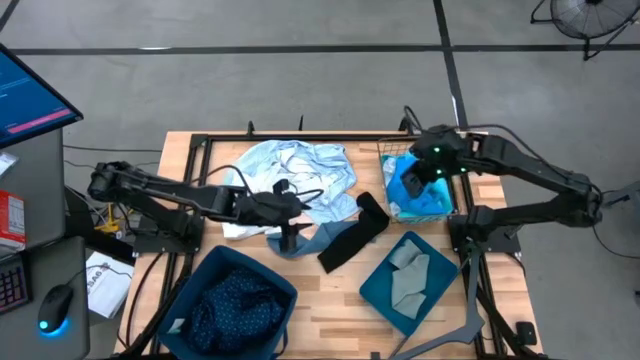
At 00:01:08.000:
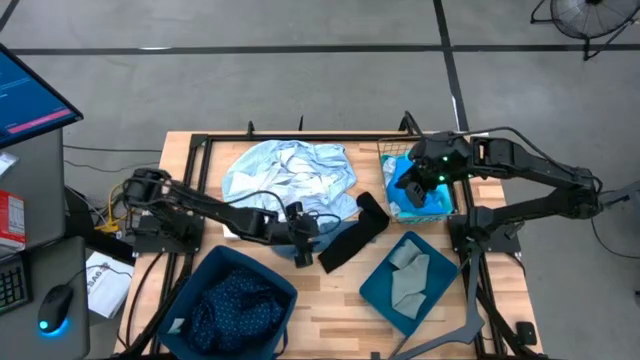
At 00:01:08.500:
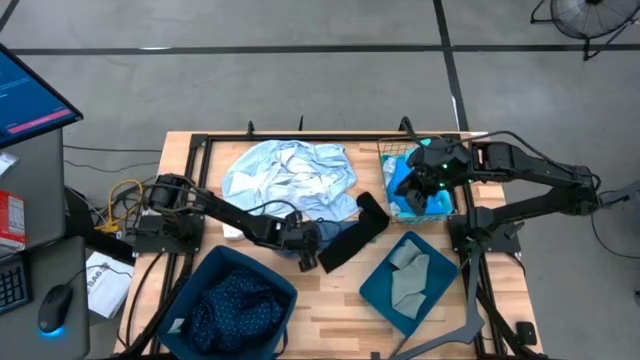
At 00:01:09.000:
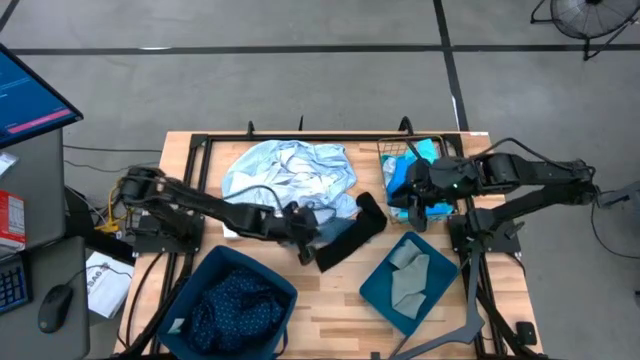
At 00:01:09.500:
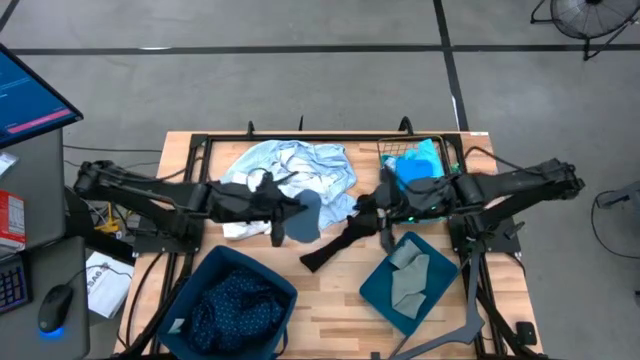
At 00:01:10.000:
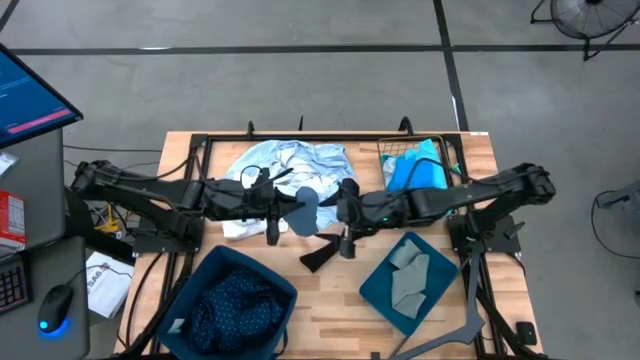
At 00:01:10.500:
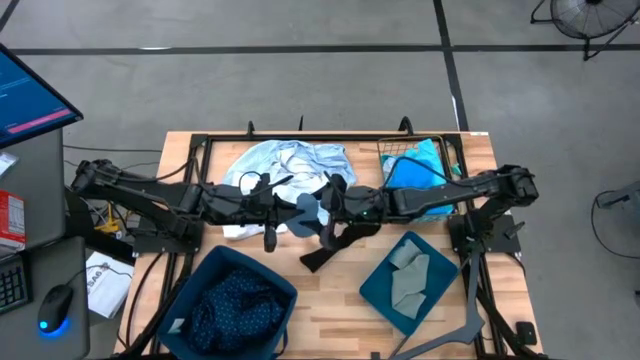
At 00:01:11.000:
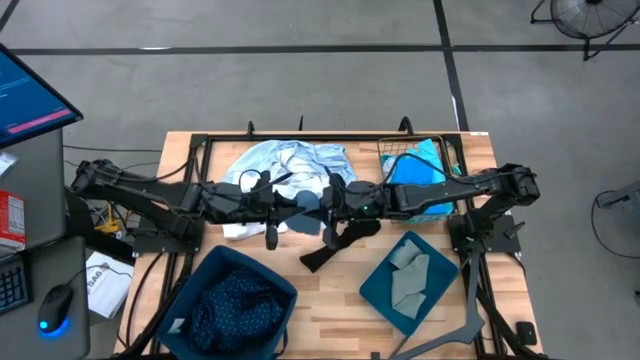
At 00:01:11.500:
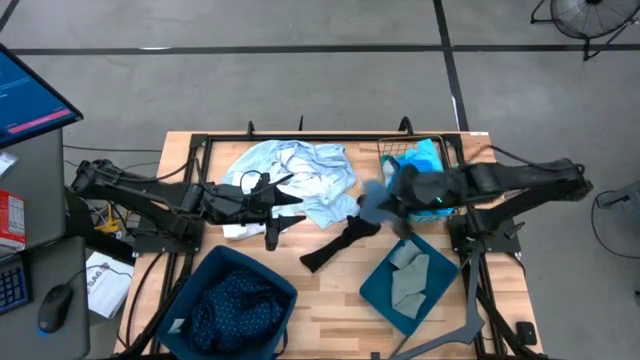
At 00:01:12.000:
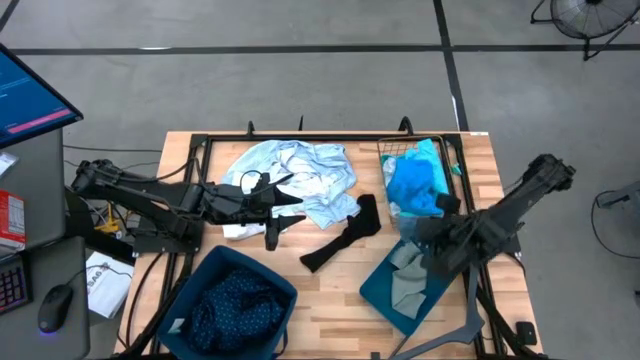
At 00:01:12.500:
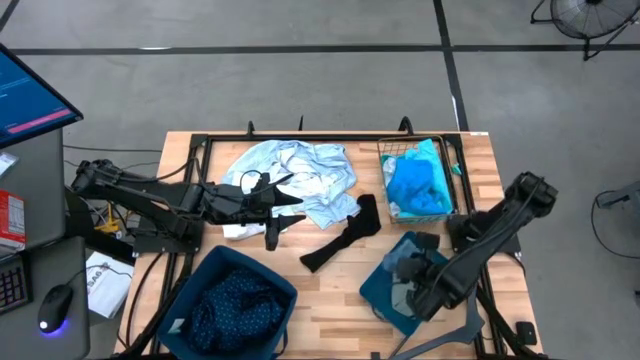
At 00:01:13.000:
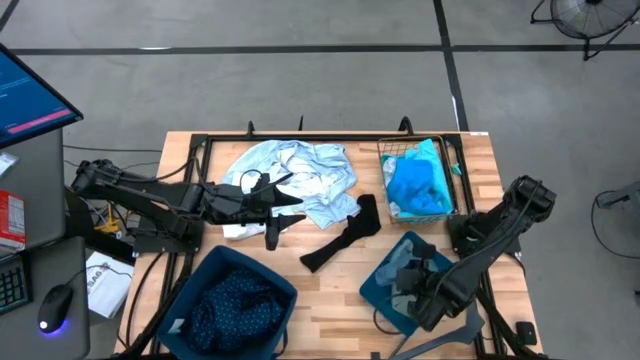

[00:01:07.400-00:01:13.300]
Task: Pick & Place Cloths
Put the gray sock into the blue bin

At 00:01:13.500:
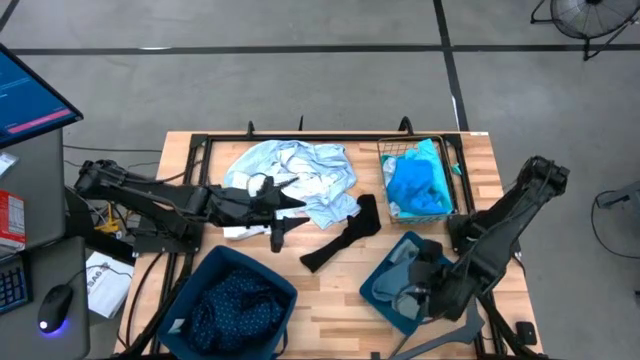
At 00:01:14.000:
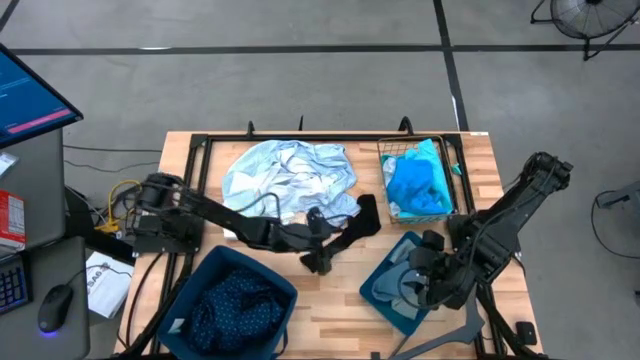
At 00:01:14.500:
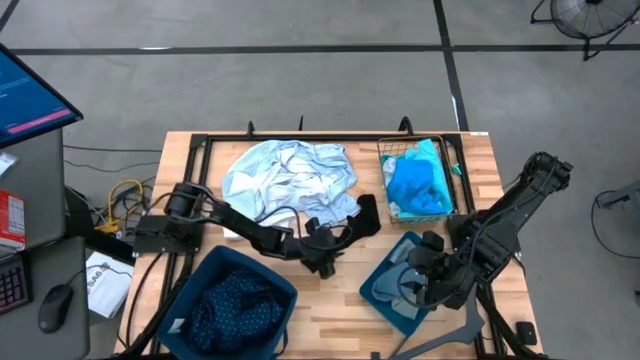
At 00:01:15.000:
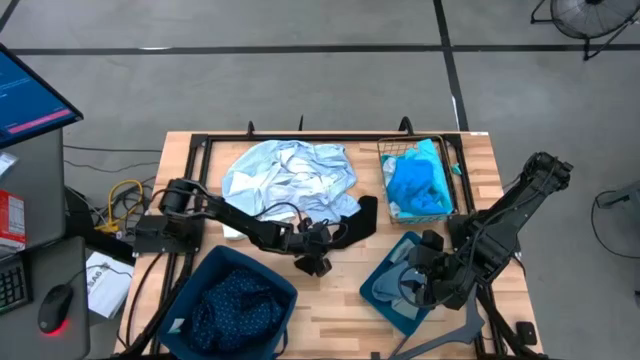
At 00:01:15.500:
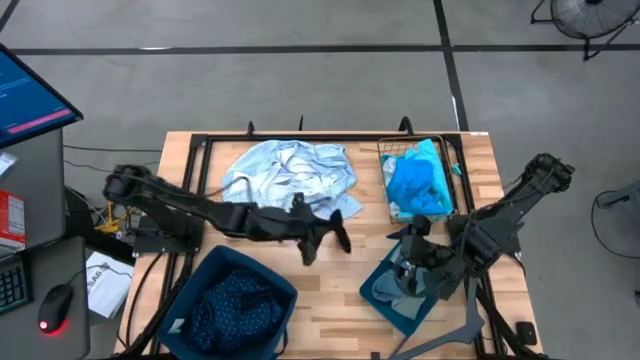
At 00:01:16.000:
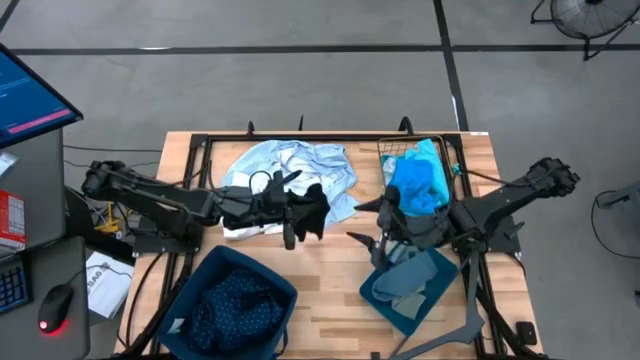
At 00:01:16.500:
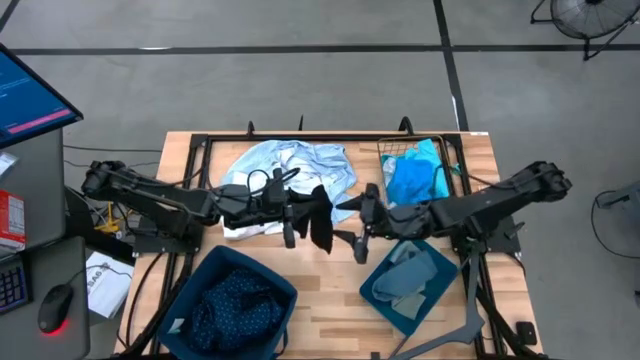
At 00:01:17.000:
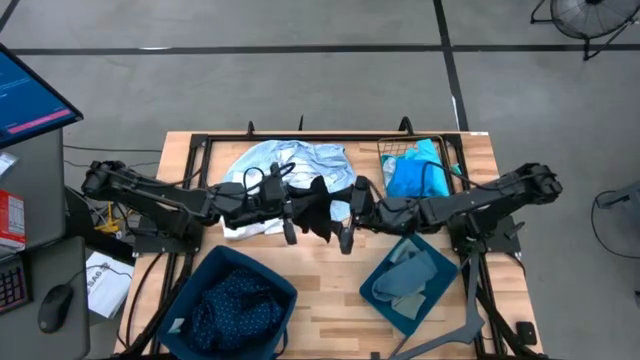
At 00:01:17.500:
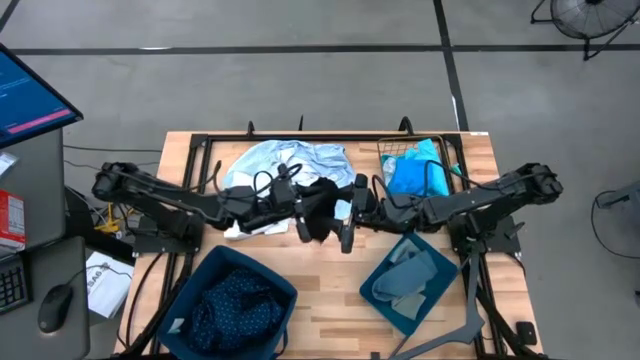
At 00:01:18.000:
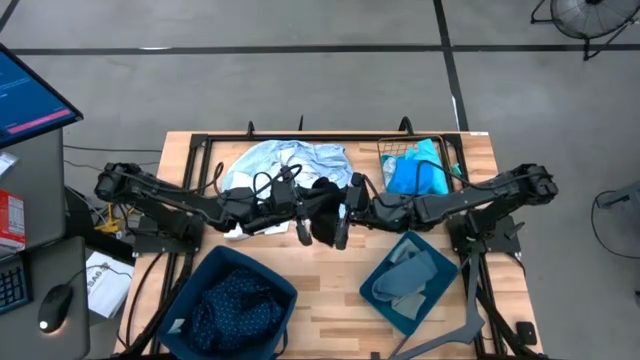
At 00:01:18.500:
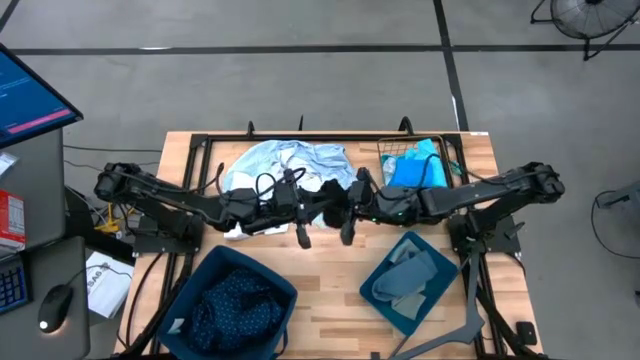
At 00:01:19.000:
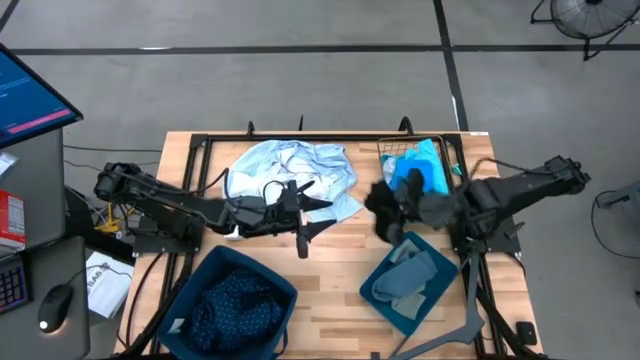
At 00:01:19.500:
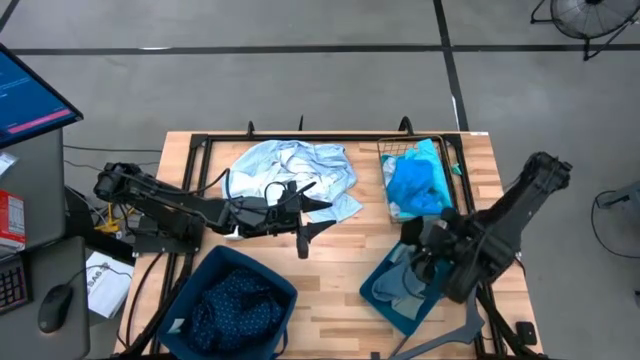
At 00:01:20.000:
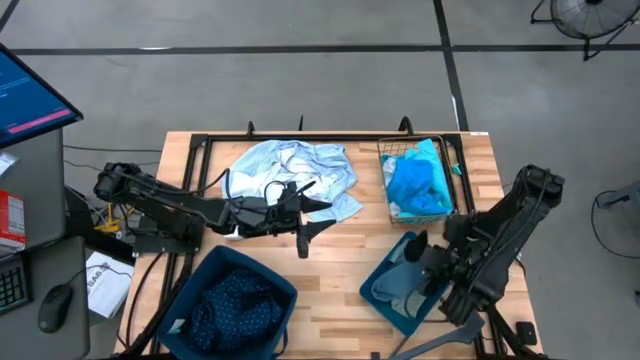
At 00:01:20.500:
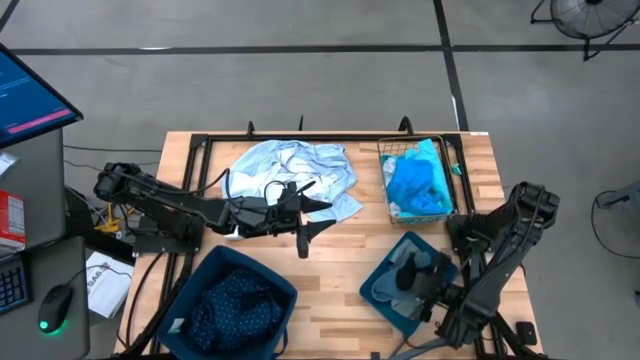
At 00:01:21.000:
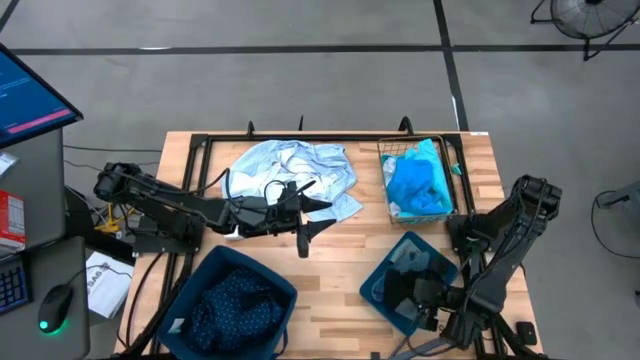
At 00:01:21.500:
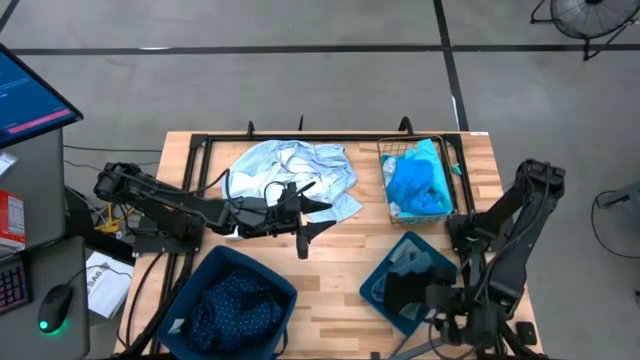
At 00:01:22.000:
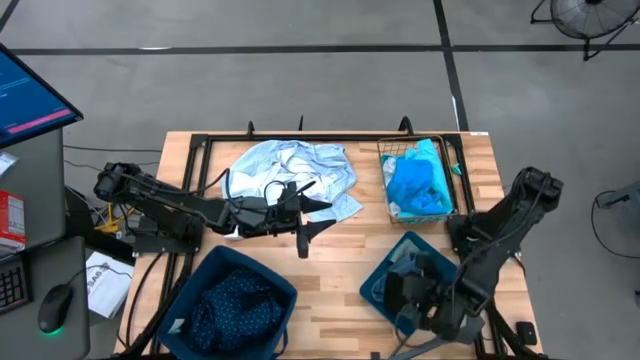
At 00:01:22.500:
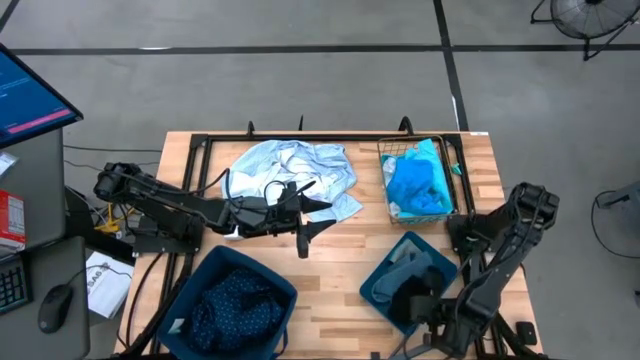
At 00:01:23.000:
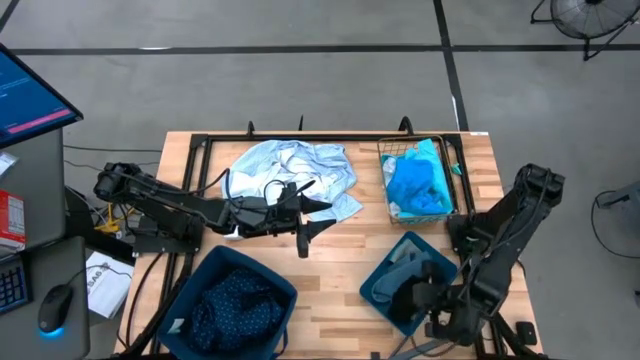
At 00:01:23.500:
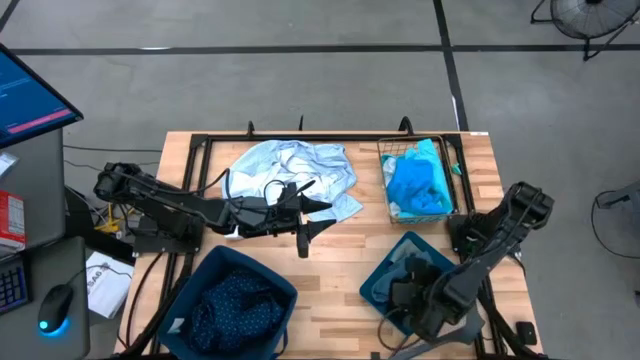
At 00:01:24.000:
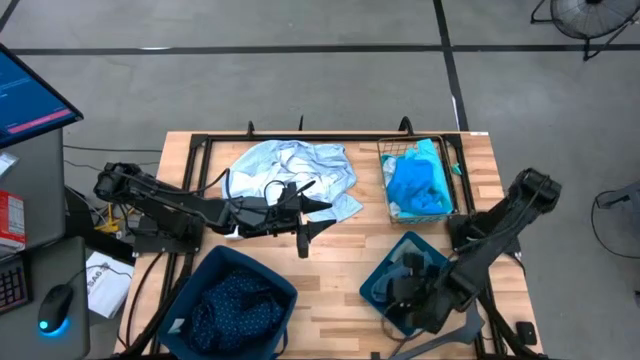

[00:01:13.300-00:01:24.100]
Put the black sock into the blue bin

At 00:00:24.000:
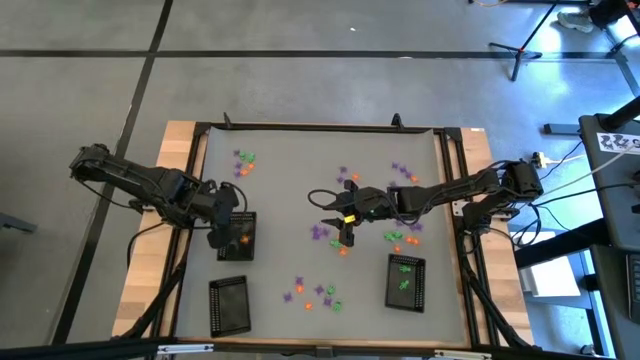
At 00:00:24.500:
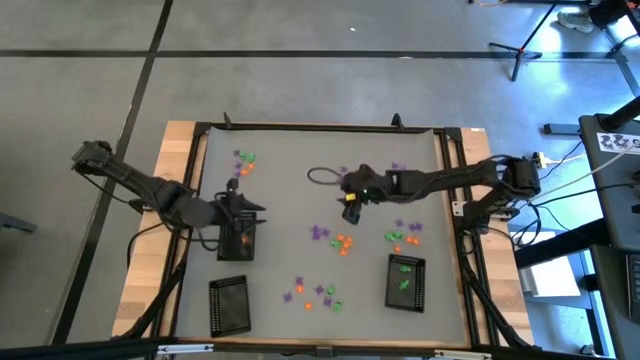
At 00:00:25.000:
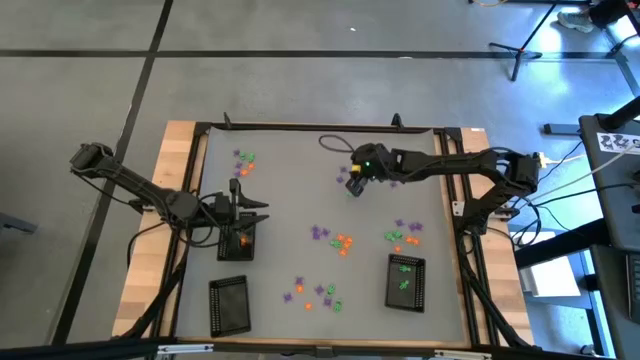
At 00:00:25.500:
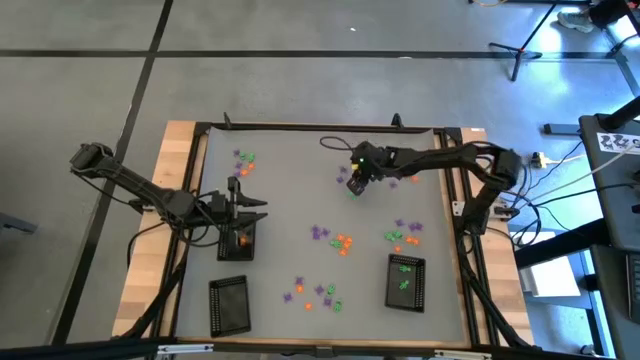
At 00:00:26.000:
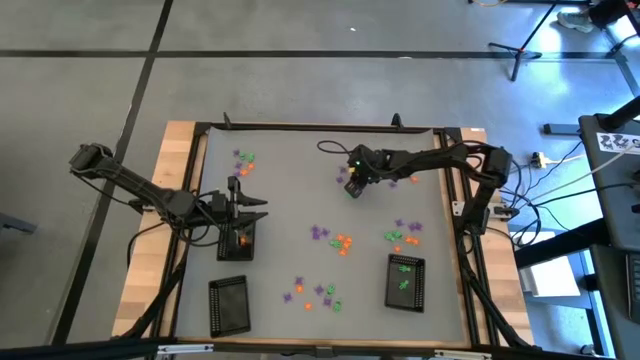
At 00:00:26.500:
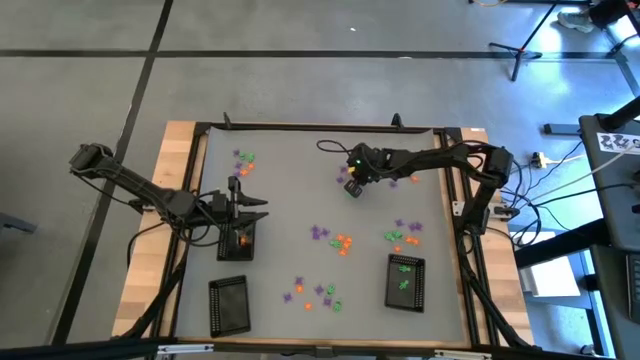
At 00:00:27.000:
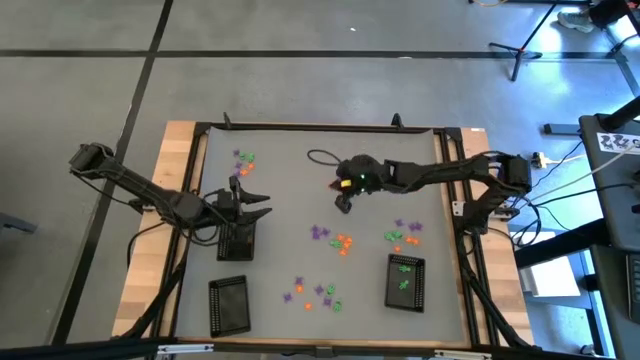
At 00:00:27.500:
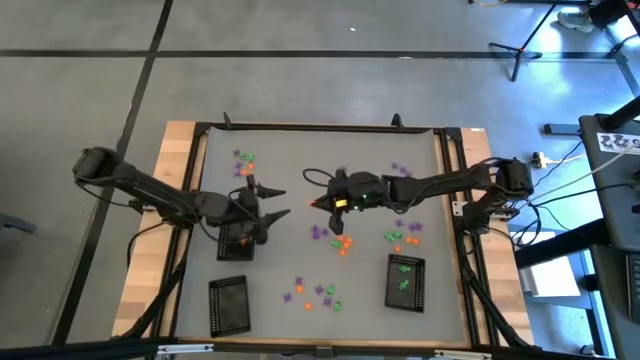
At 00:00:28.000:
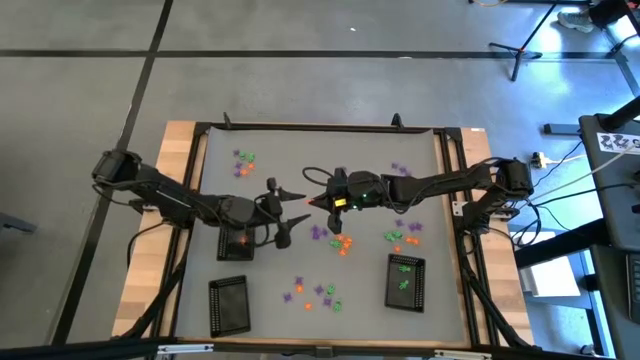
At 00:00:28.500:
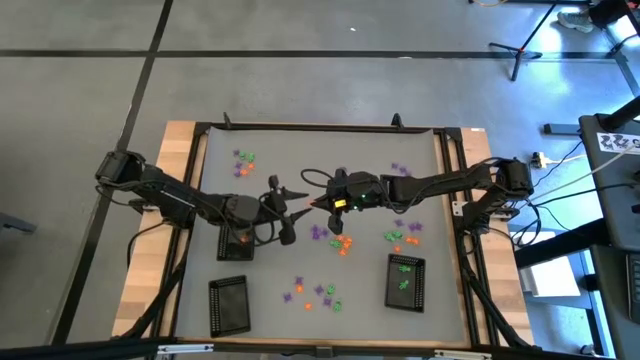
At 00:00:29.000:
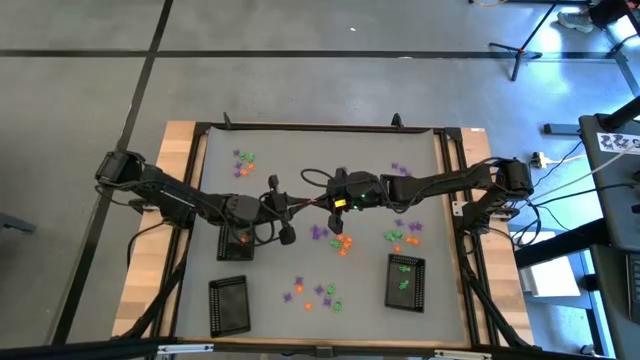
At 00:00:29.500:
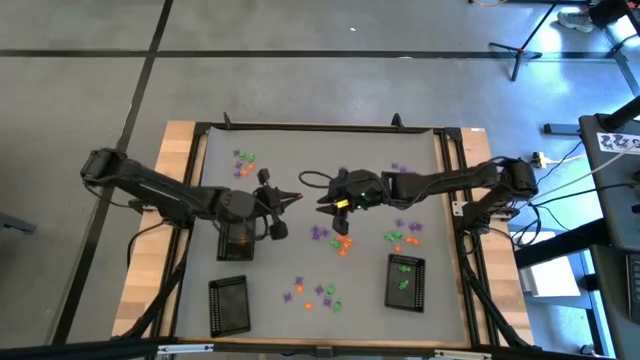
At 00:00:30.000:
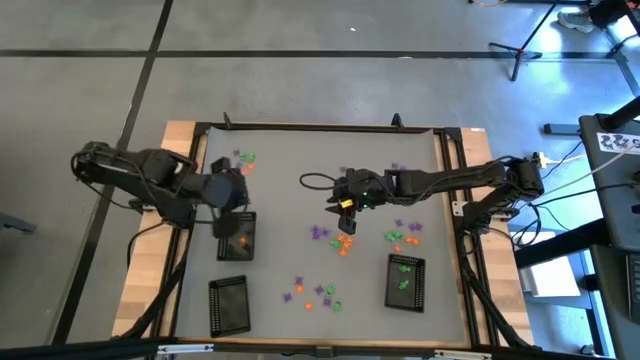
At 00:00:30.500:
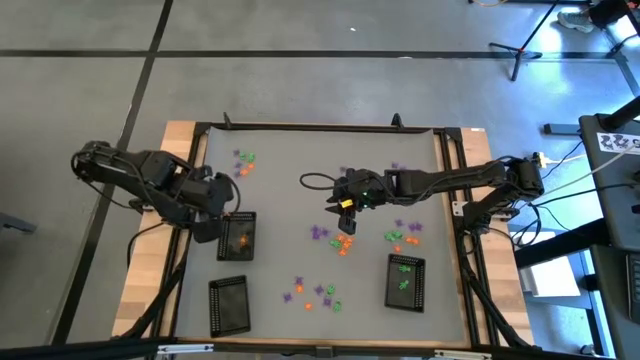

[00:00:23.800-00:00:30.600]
Task: Sort Halloween decoration
Put the orange spider toy into the top black basket
